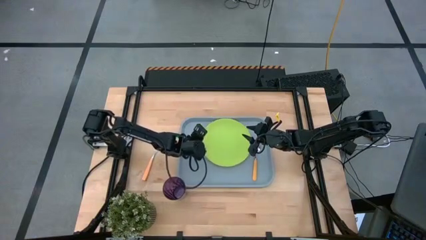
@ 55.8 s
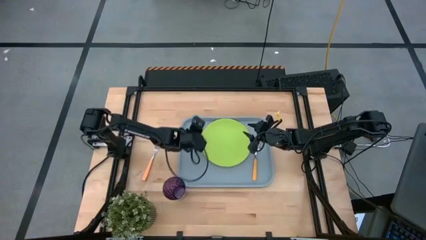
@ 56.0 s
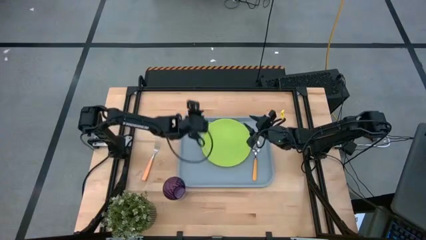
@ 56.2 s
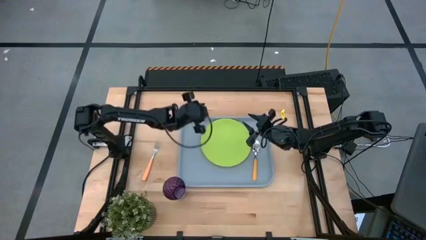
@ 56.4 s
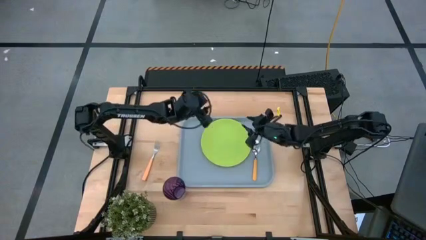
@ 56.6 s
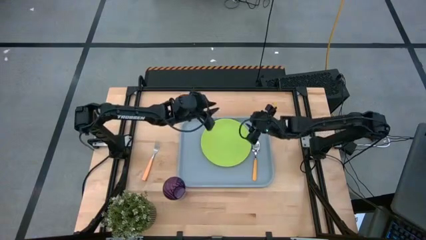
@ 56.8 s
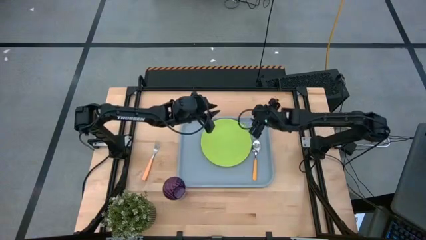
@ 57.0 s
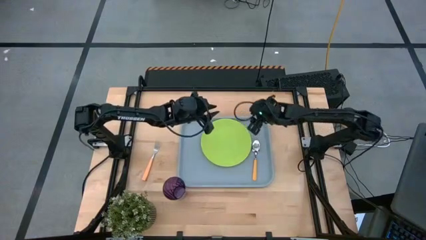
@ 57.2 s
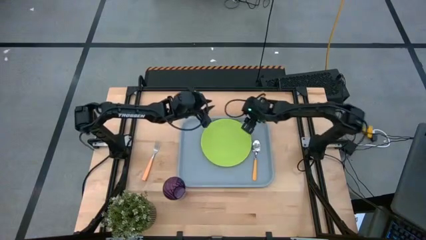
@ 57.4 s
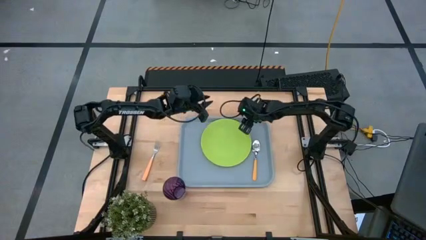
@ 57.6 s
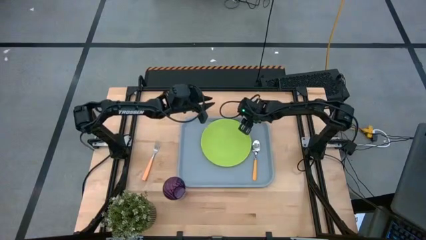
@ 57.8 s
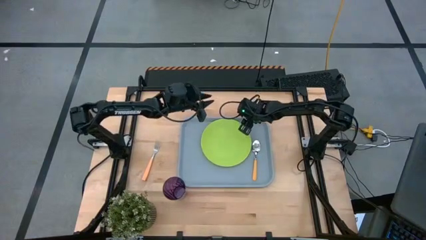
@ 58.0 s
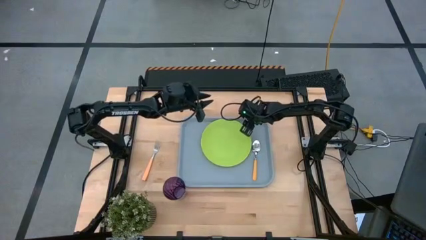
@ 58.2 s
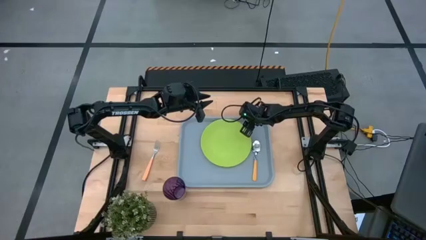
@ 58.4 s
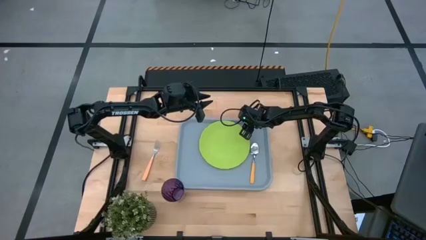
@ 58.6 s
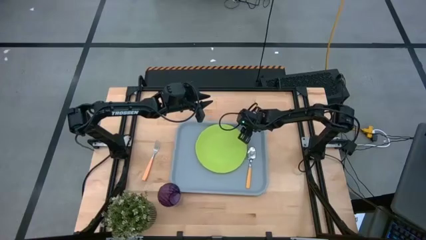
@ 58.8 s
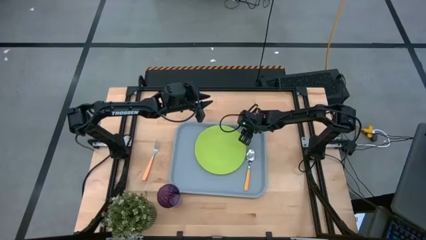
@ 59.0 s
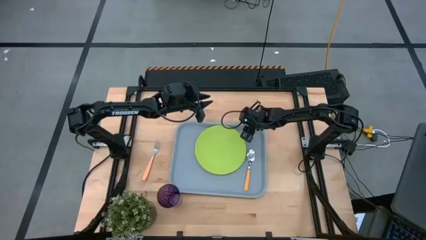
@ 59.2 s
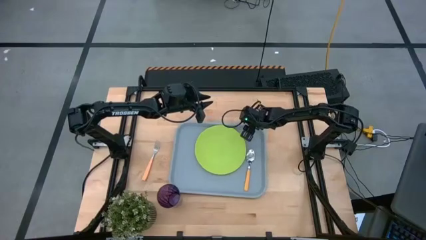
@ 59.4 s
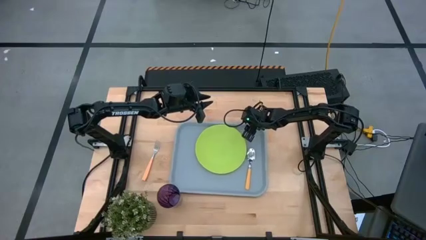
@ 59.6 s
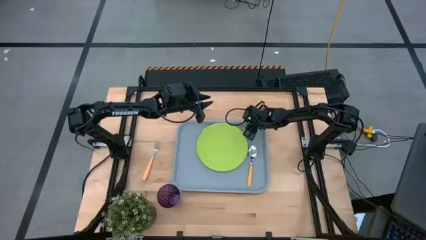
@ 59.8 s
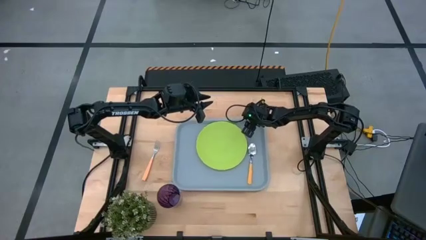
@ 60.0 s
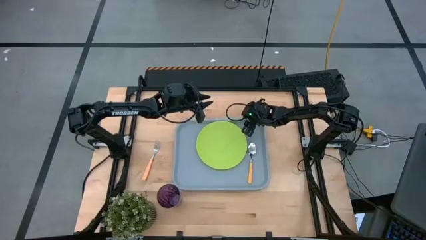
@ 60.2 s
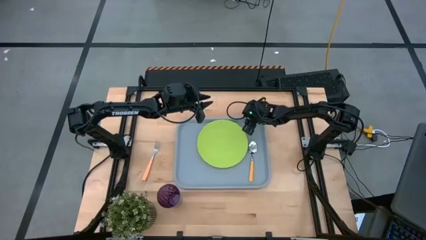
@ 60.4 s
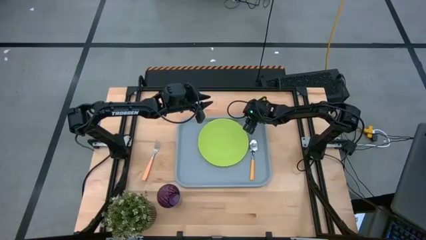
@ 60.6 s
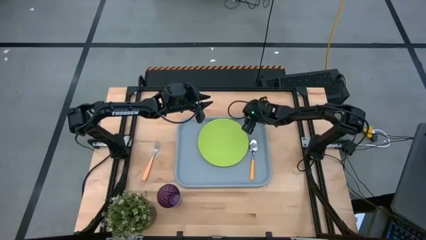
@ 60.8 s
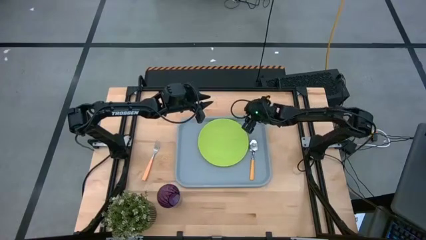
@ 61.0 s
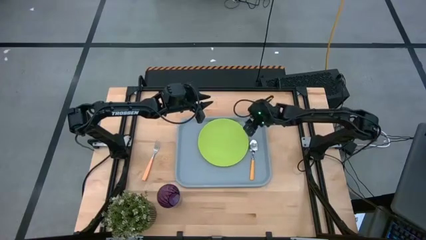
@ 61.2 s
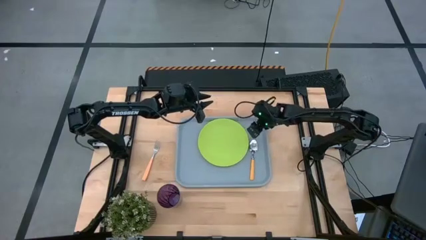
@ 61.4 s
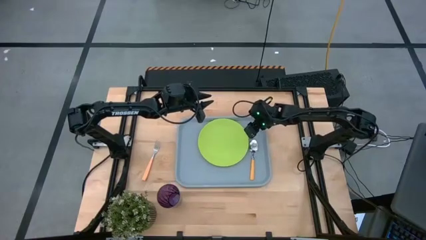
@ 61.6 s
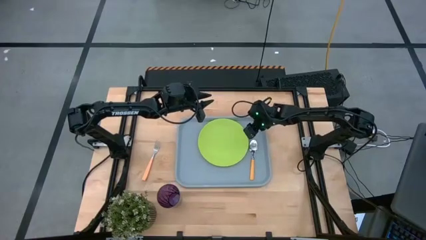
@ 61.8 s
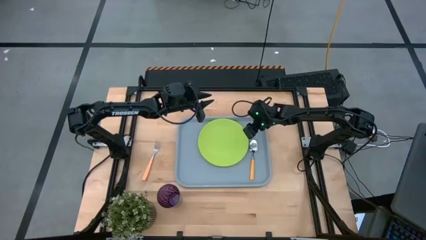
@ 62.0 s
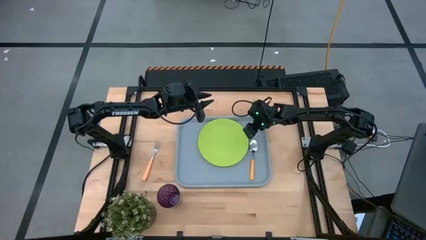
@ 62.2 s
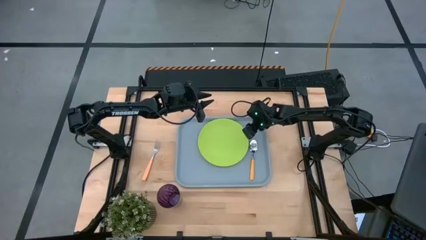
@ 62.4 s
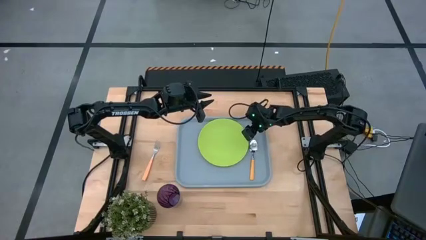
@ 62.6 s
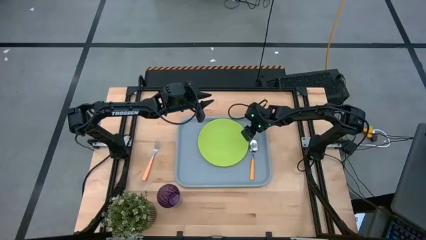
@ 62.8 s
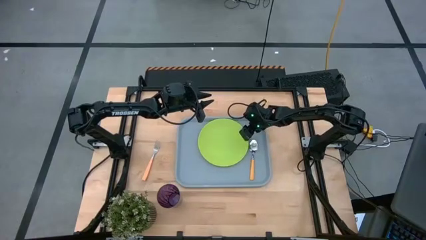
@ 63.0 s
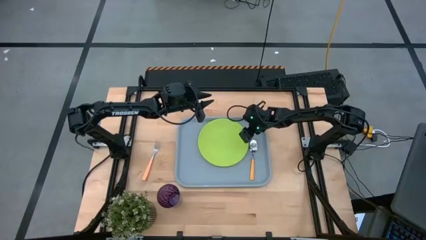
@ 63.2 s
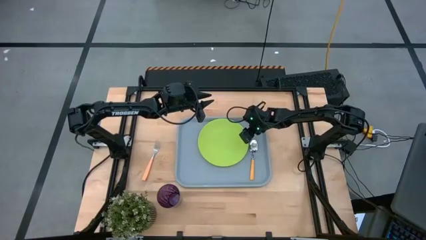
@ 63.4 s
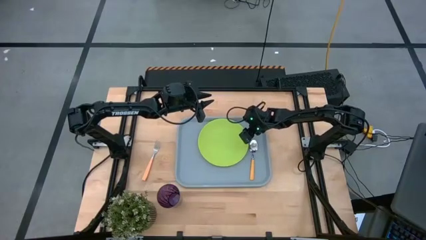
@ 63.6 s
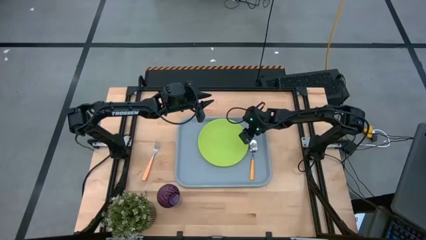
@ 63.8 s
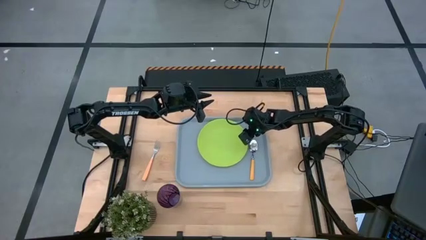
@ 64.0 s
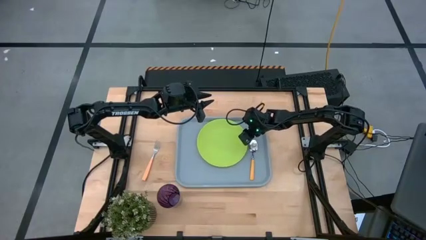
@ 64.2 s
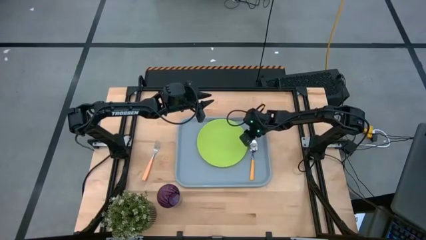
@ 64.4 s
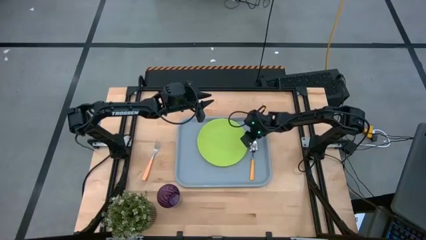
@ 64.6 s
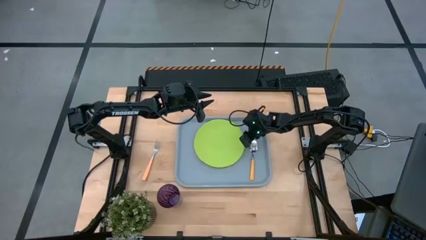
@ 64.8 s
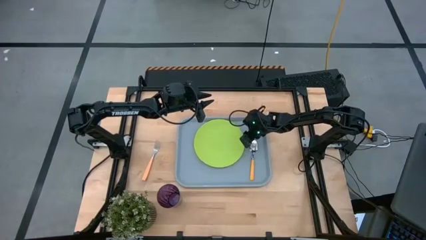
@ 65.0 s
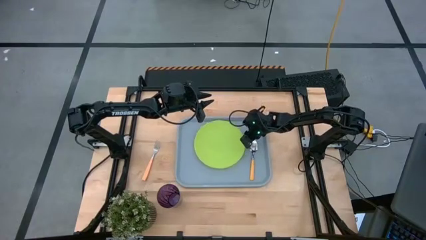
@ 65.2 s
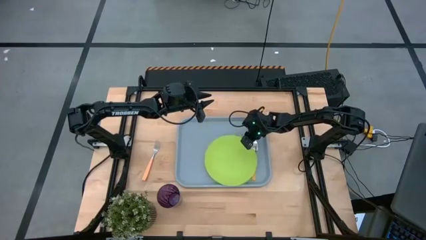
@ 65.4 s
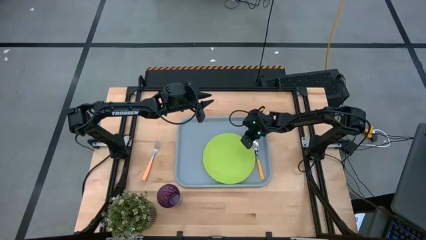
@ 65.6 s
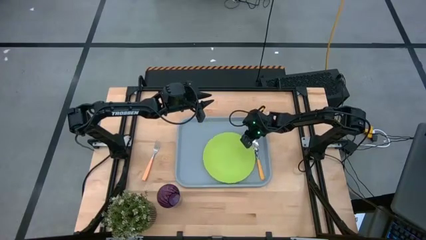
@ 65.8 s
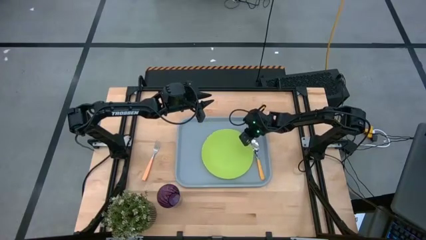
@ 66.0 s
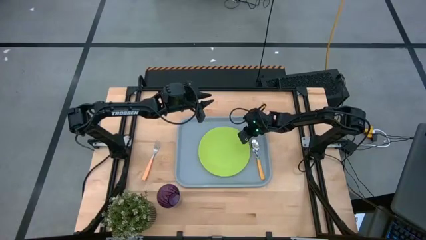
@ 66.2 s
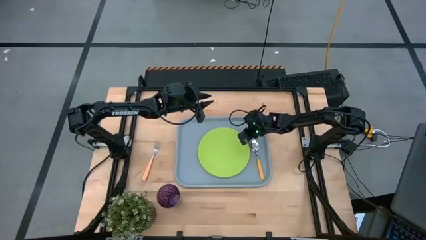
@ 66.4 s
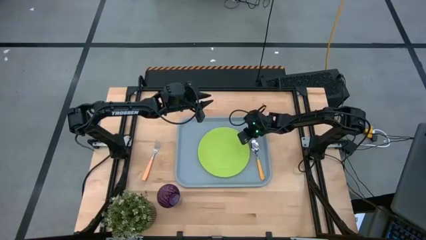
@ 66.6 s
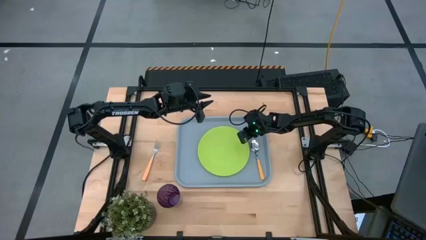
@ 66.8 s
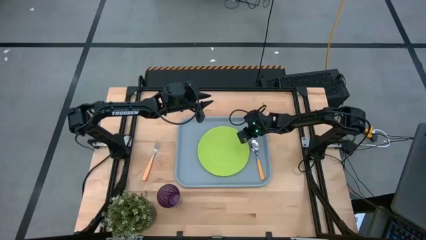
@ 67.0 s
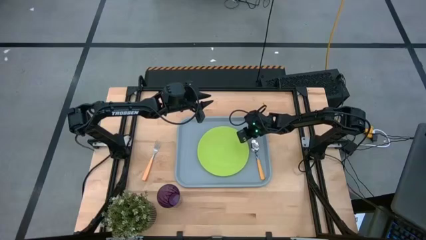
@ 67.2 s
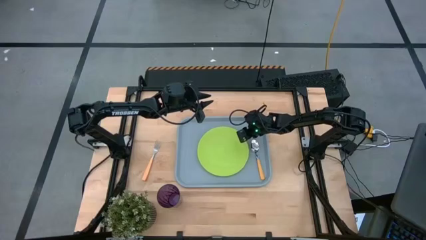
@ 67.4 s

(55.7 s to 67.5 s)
Task: Pick and place plate/cup/fork/spoon on tray
Adjust the gray serving tray and green plate

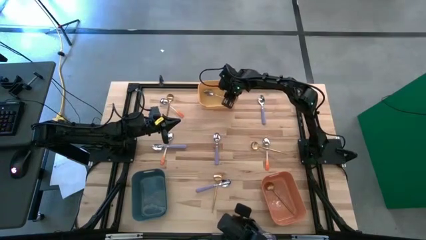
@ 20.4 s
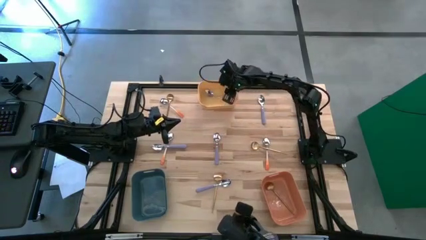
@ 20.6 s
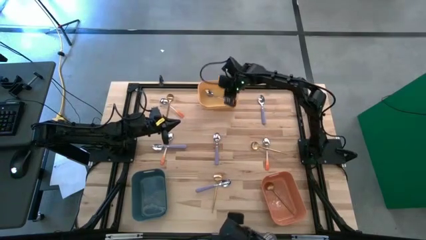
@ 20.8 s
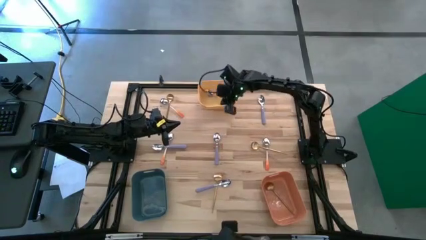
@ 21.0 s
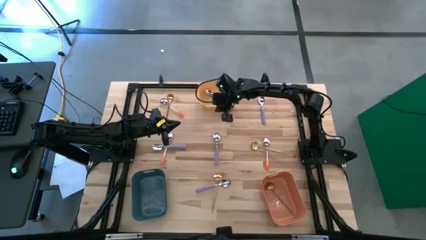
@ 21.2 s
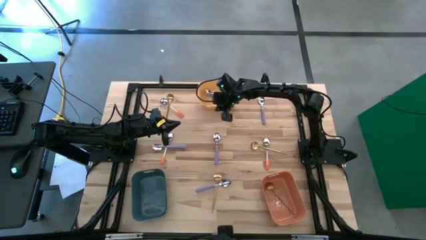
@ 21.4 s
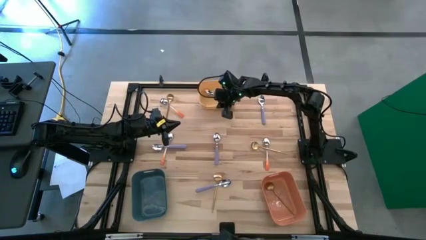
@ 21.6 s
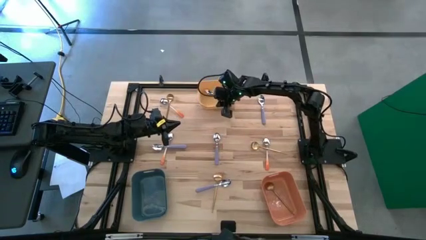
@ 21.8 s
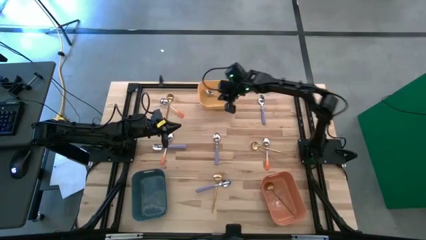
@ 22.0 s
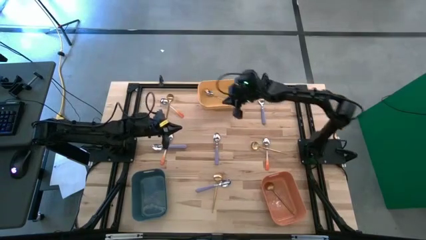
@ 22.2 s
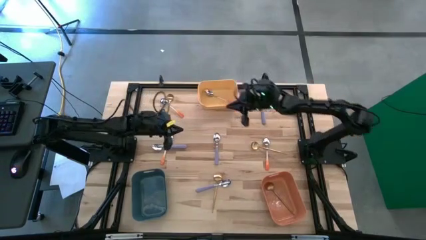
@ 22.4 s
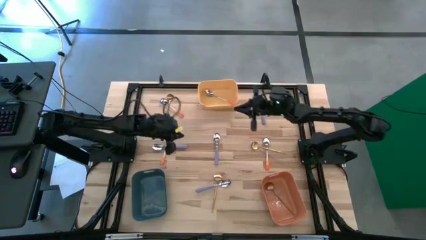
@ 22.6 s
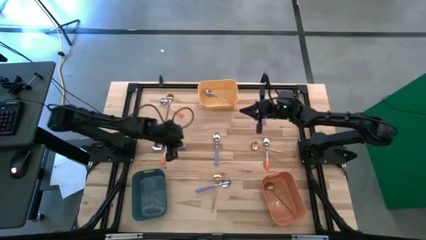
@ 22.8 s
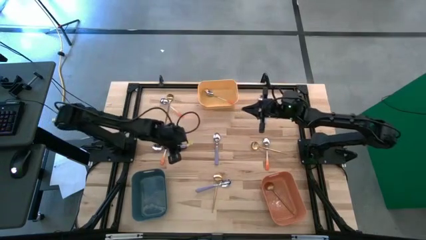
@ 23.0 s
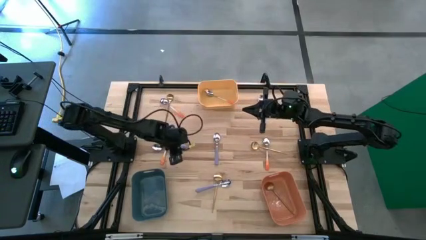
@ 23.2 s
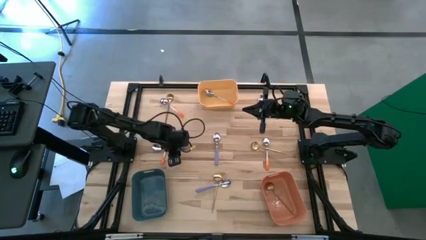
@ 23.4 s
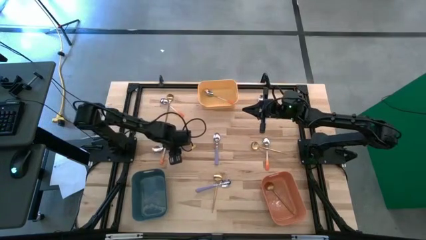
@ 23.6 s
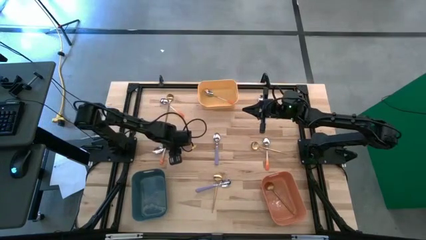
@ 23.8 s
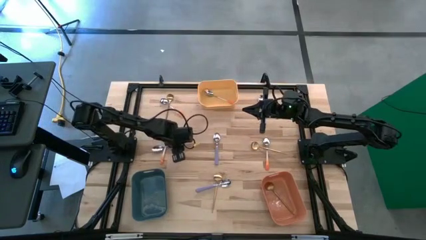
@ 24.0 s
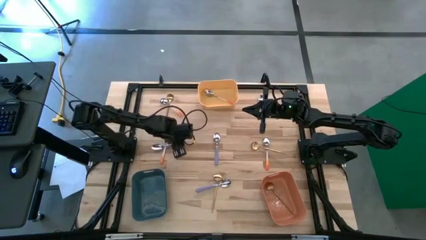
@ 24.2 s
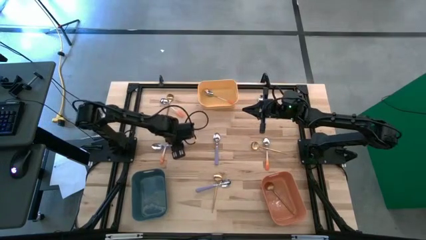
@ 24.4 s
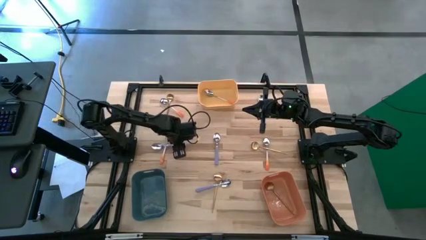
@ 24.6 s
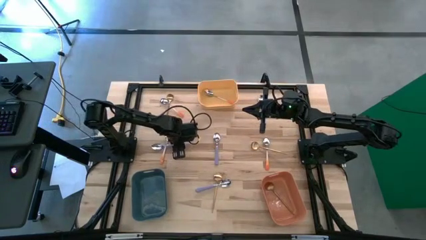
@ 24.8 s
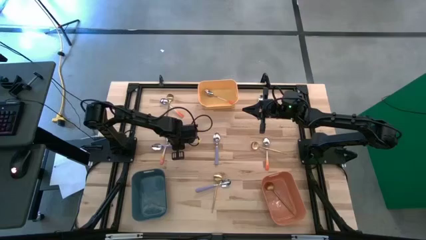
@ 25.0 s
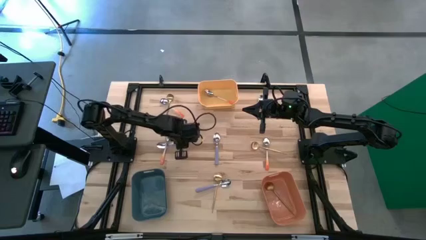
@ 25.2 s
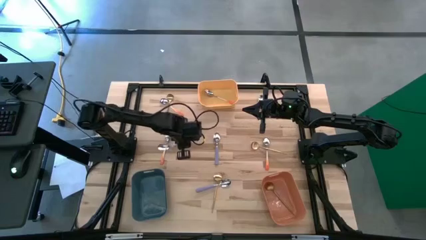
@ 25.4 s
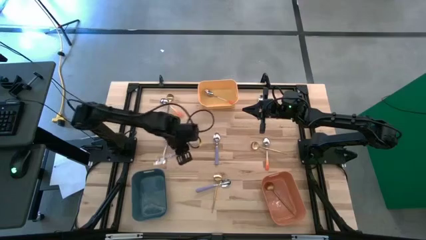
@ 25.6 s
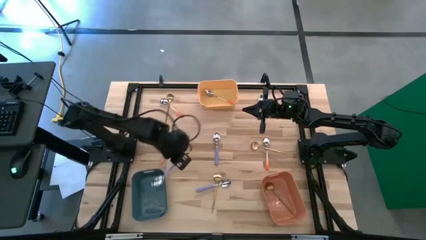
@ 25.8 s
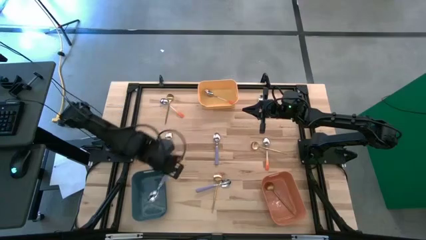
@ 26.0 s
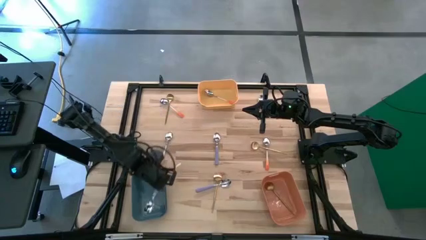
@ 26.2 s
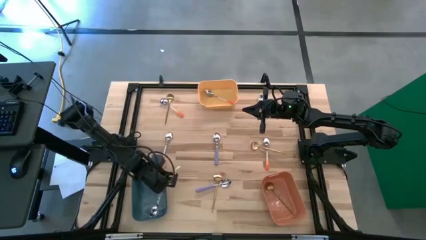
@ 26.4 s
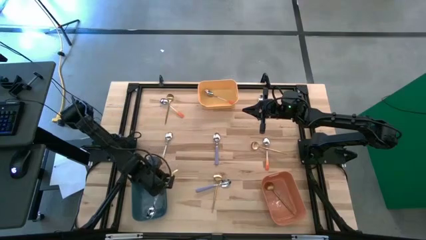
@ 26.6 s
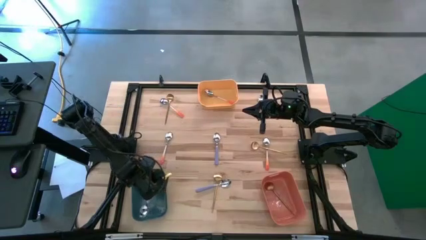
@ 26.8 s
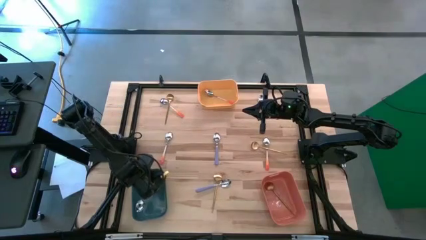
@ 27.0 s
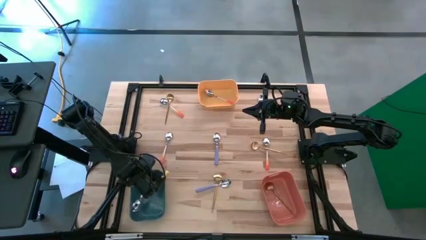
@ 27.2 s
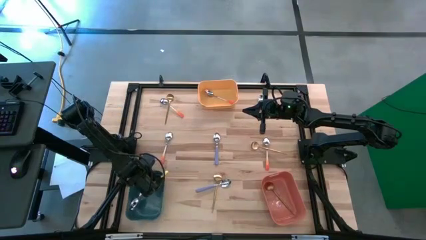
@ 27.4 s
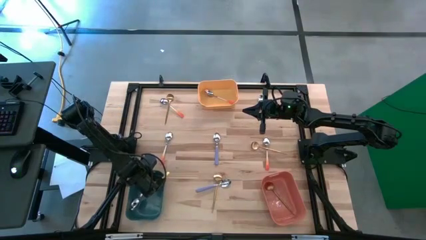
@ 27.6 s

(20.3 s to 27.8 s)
Task: Sort silverware by color (type)
Put the top left blue spoon into the blue bin
